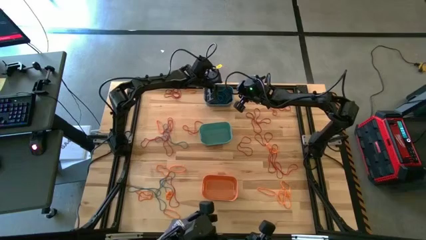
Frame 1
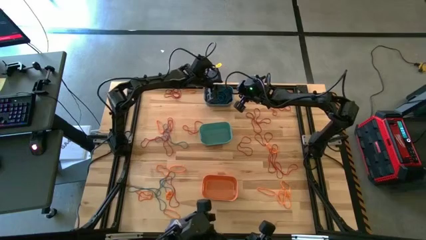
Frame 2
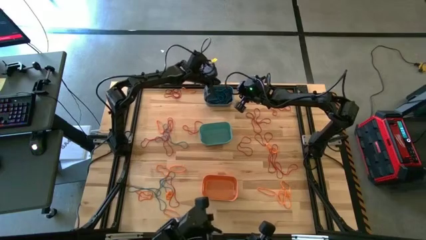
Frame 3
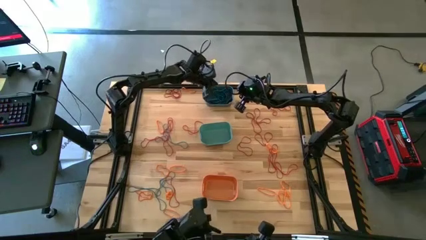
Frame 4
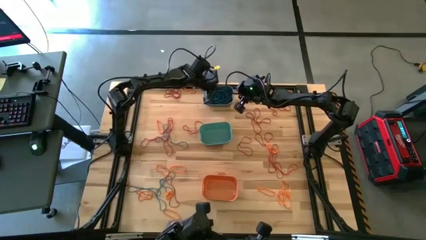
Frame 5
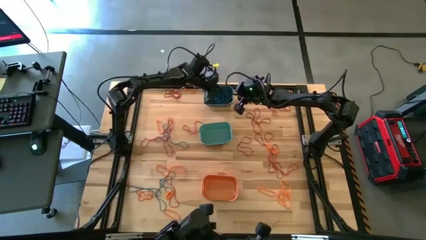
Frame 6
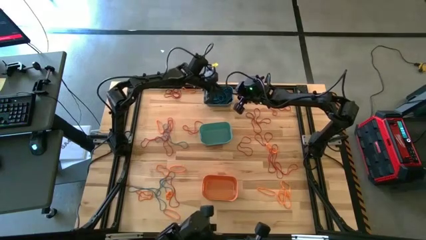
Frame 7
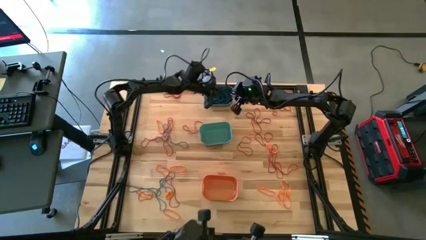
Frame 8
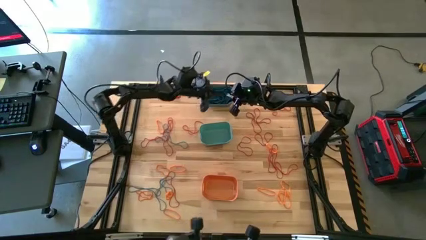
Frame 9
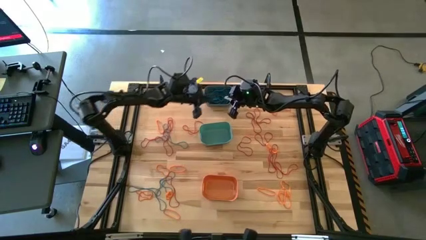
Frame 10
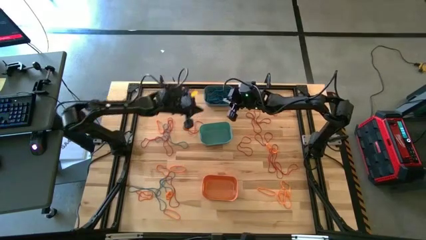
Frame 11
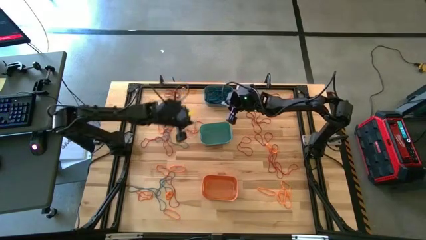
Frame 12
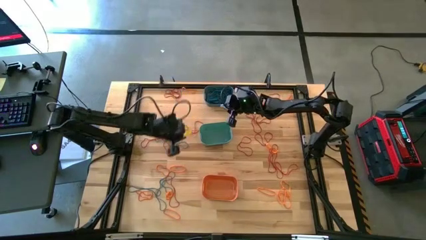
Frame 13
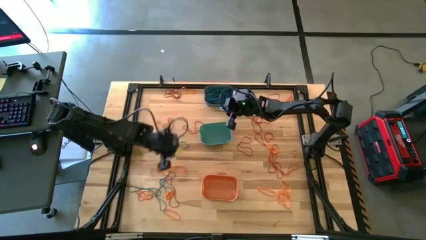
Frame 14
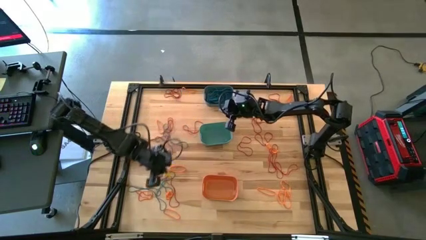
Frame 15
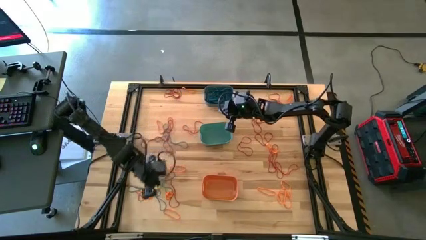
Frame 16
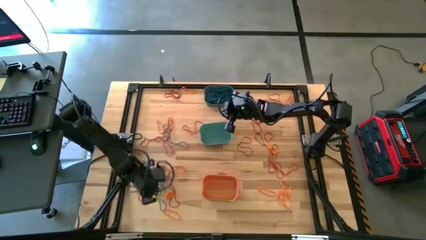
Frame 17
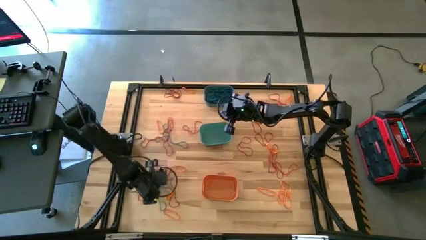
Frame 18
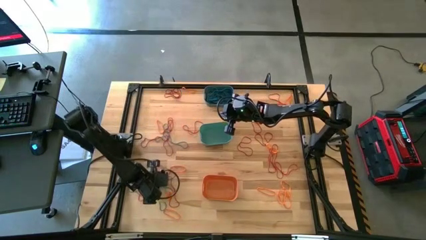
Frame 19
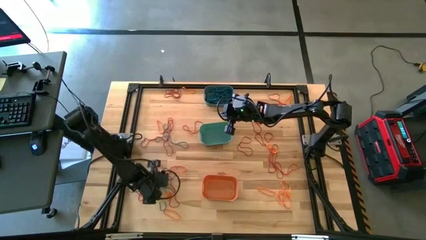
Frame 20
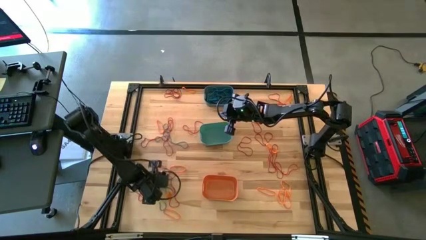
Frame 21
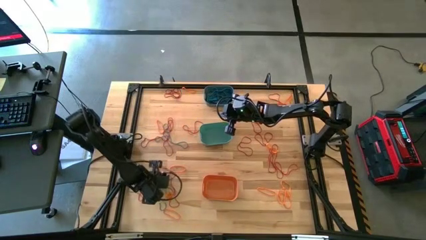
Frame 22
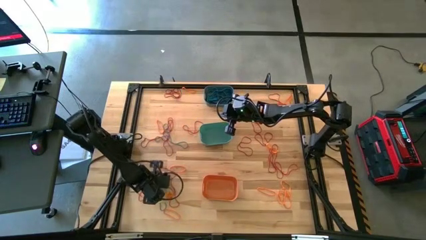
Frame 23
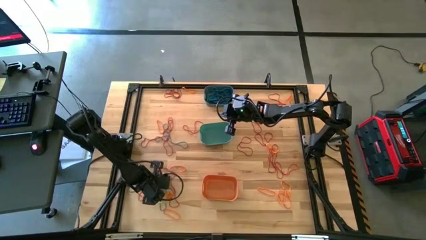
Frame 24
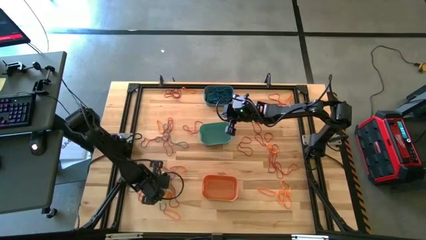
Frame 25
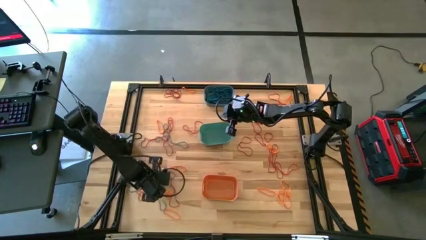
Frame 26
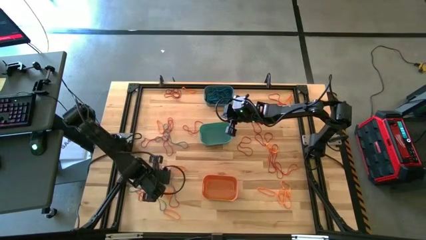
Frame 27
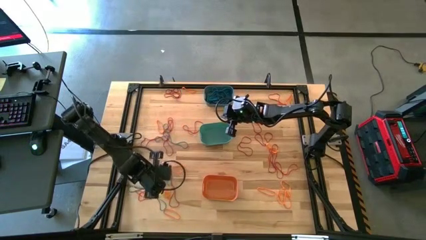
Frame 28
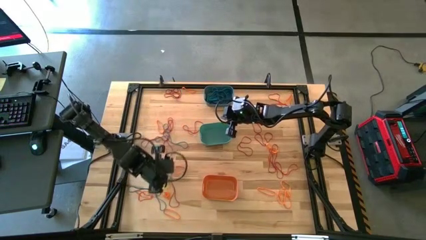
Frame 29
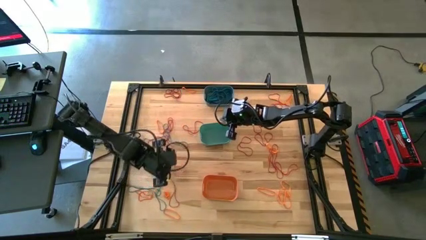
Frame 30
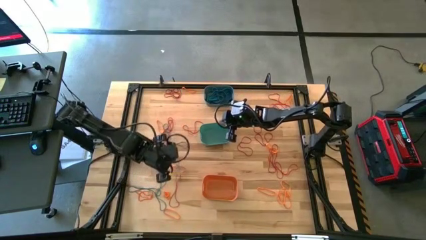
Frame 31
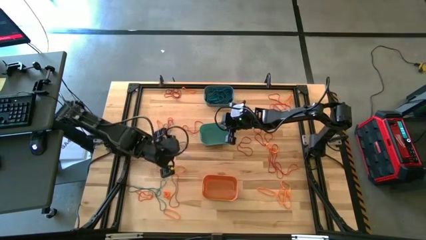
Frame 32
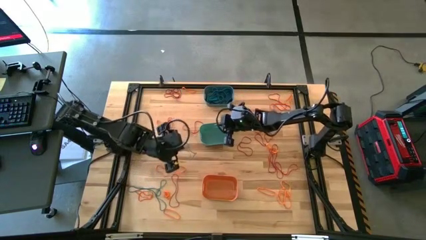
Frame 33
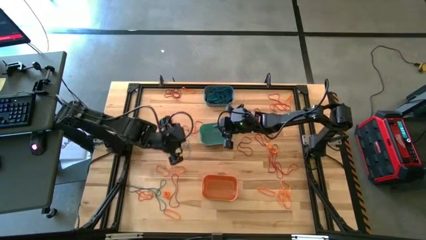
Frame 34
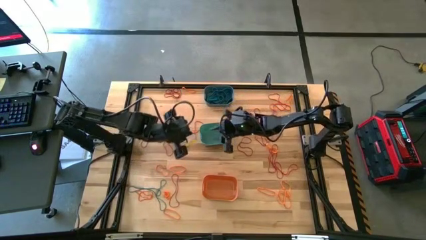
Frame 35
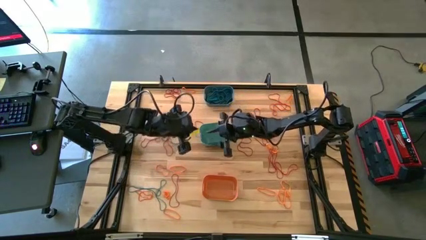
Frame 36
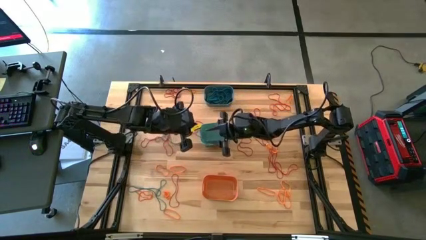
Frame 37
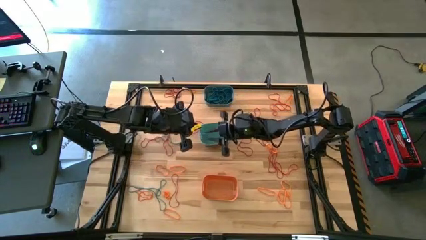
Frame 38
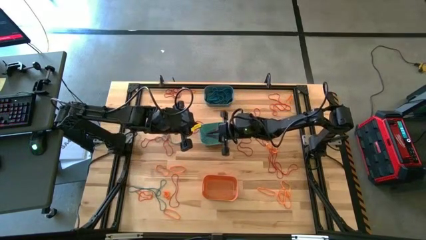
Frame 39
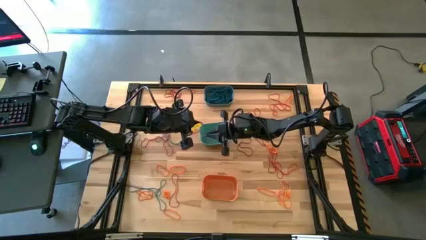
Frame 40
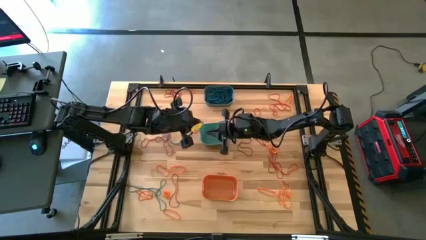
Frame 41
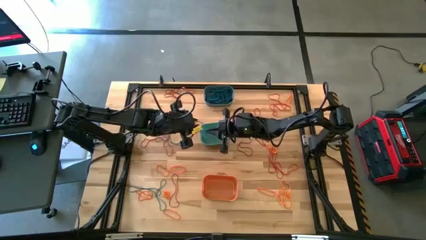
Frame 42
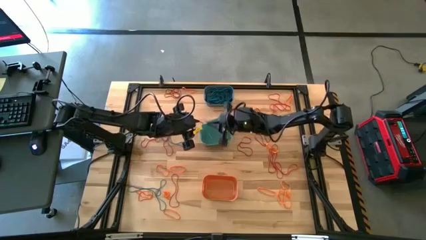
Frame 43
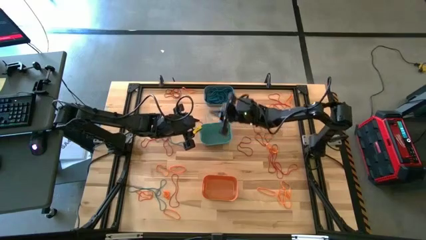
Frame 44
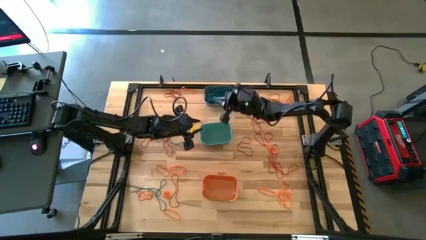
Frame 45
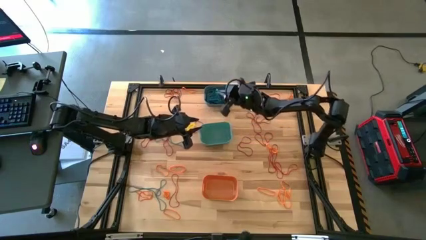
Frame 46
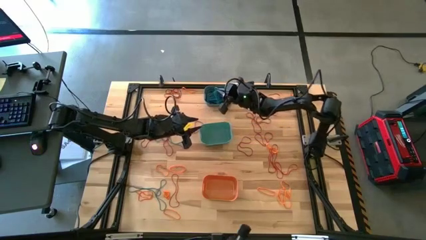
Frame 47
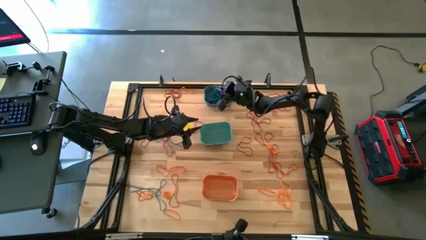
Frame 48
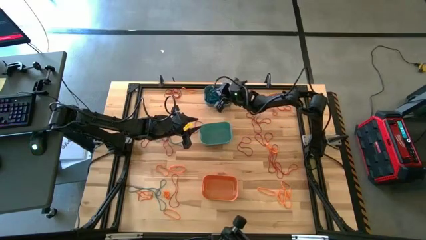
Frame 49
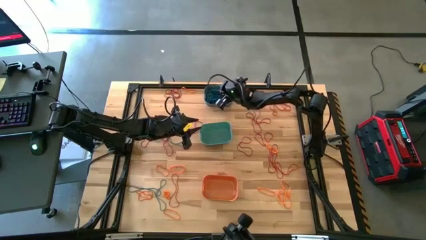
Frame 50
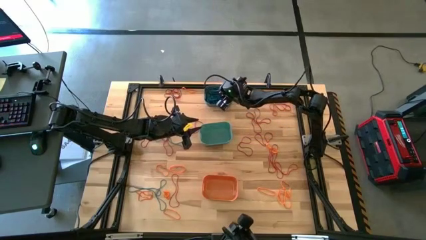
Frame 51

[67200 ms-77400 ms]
Task: Sort rubber bands into baskets
Put the blue rubber band into the blue bin

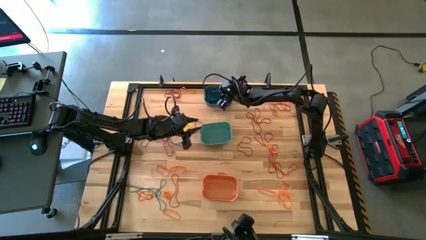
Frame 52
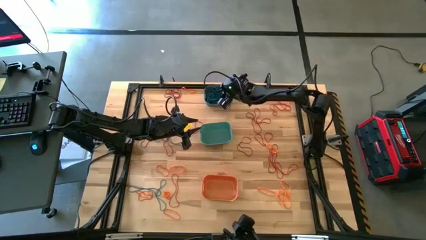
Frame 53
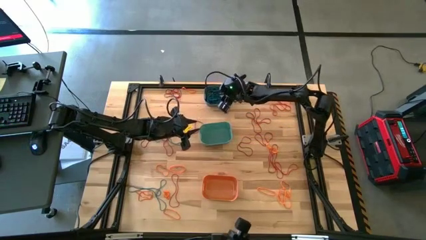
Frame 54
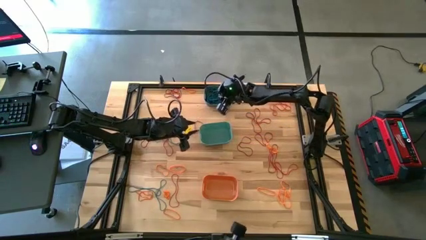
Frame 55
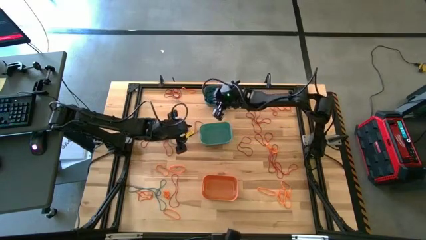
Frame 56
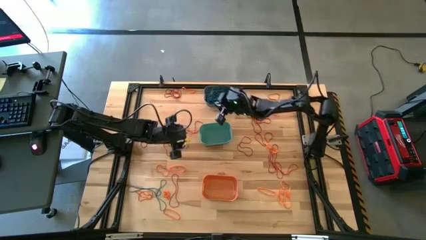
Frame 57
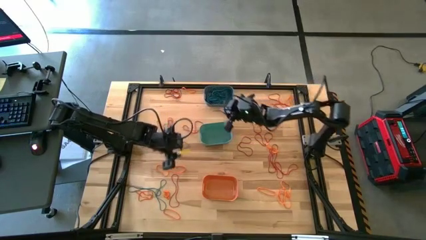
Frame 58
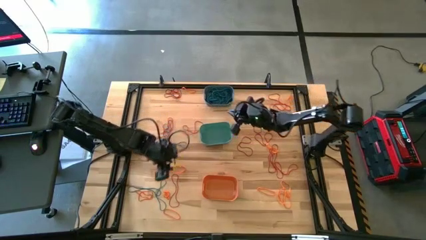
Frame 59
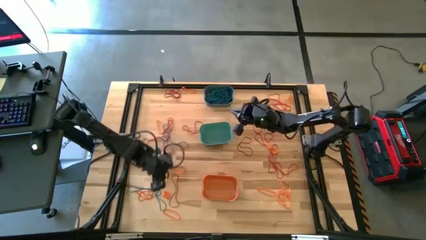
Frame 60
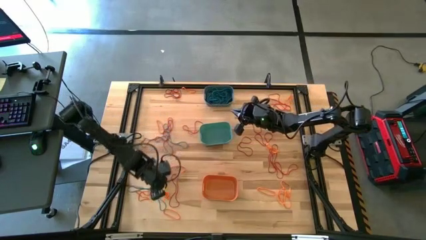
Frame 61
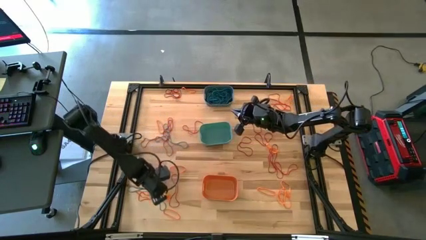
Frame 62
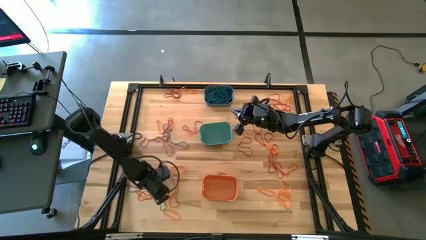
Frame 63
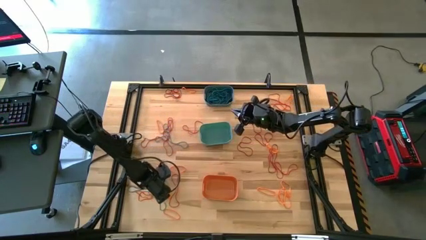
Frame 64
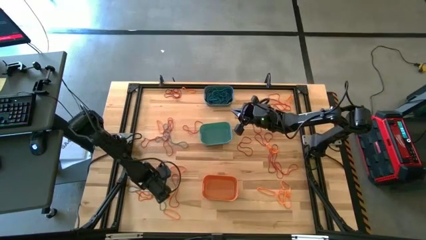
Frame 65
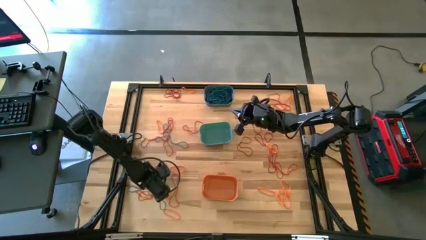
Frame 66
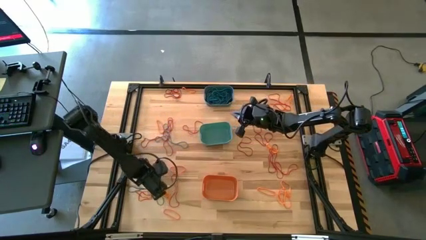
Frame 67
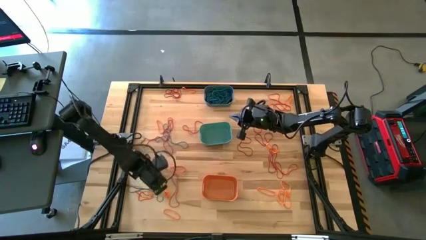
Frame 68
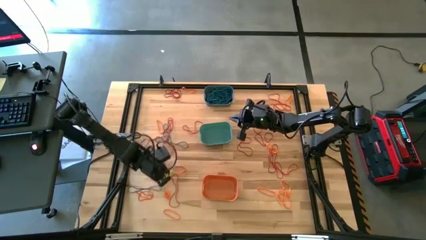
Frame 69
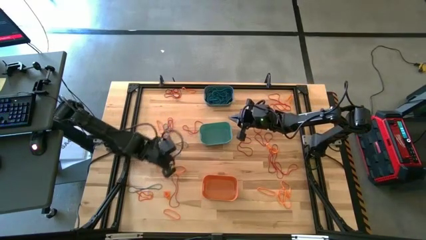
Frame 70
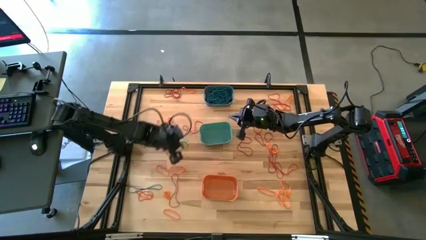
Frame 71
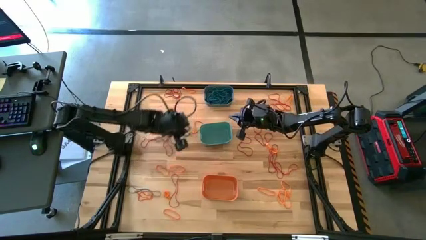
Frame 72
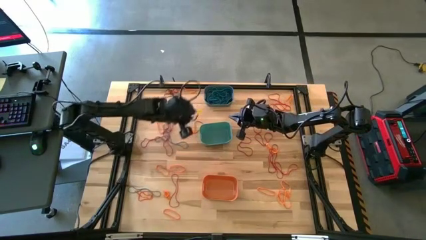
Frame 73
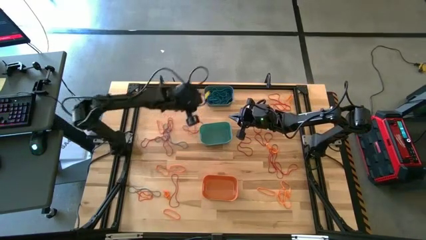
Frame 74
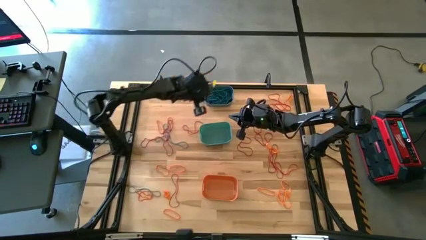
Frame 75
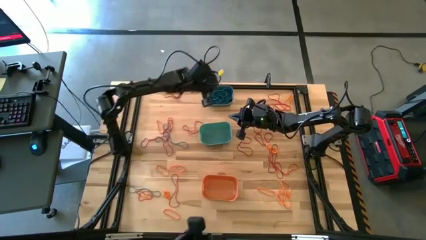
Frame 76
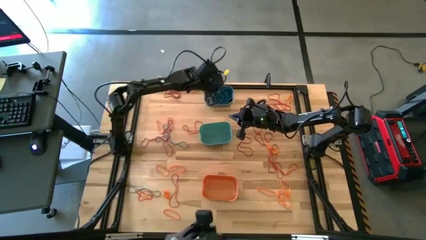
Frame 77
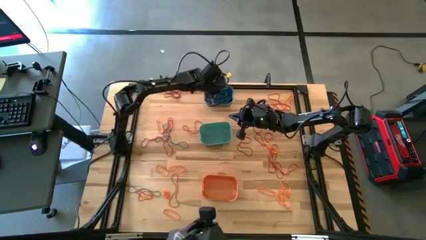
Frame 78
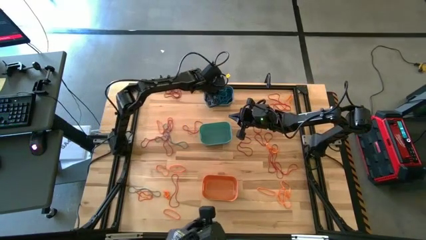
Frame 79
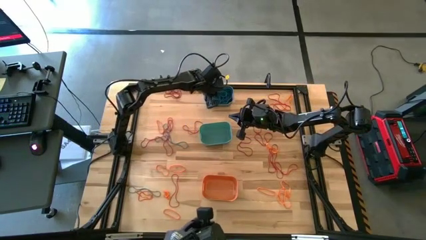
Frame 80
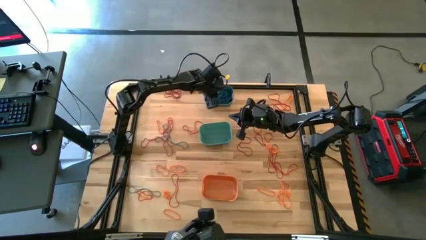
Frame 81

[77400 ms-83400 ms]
Put the blue rubber band into the blue bin
